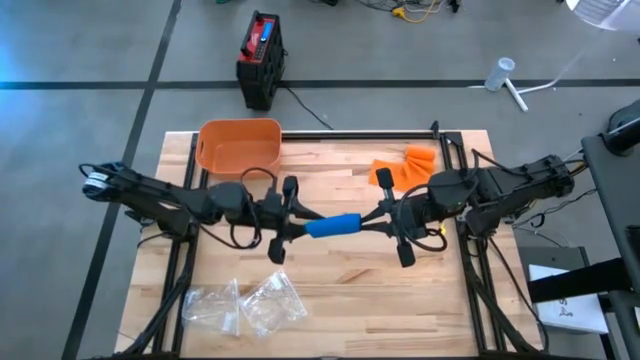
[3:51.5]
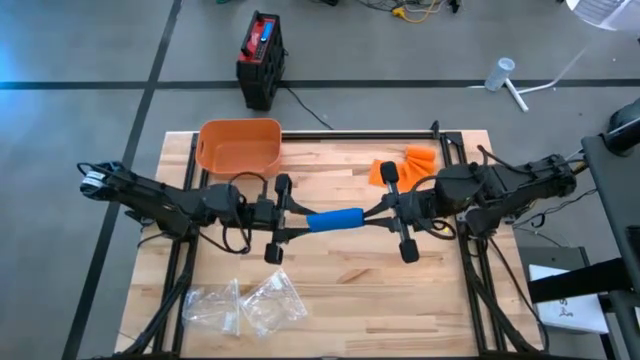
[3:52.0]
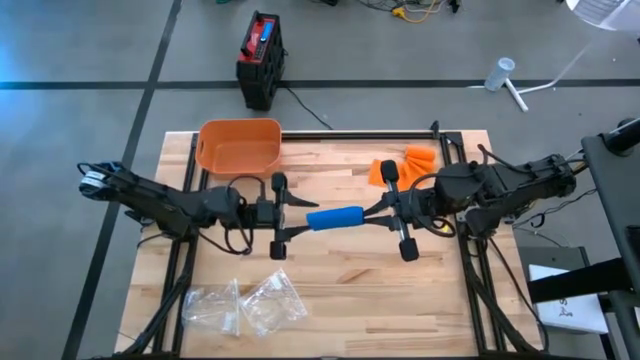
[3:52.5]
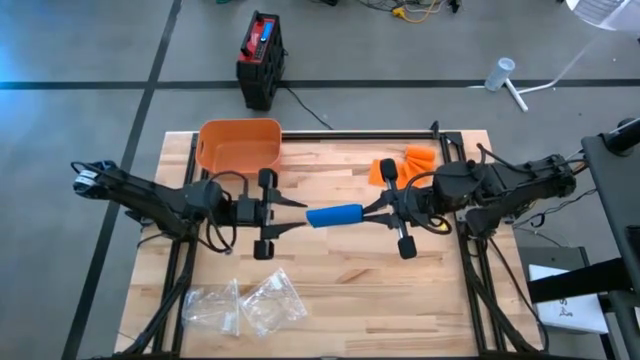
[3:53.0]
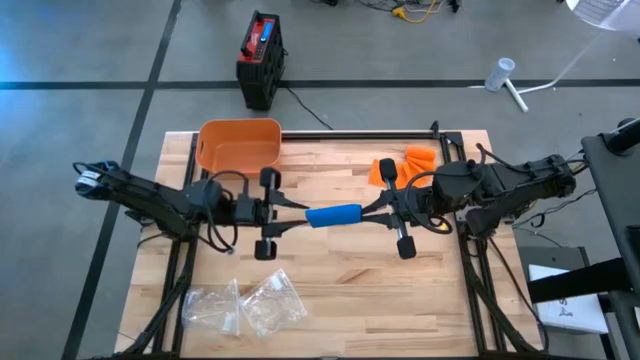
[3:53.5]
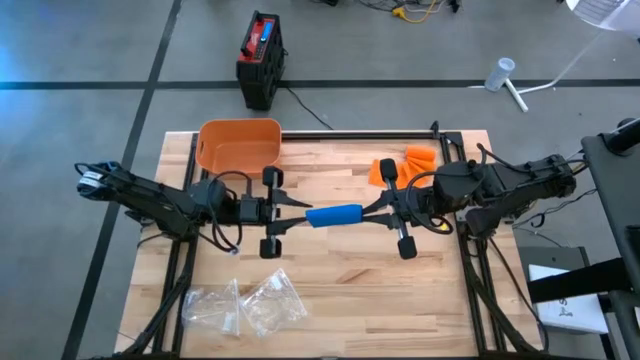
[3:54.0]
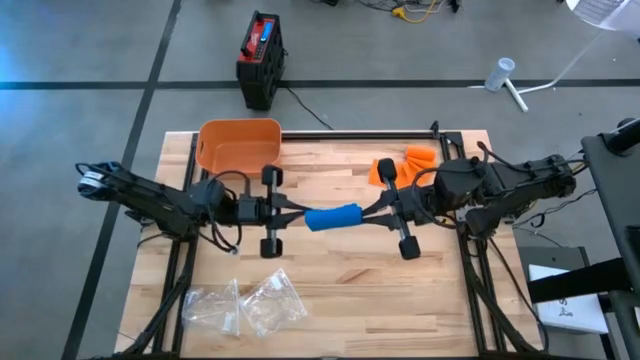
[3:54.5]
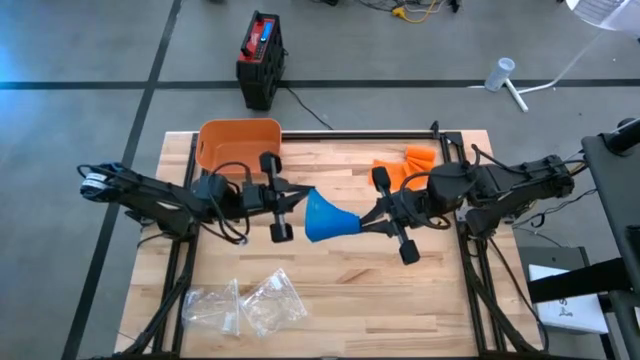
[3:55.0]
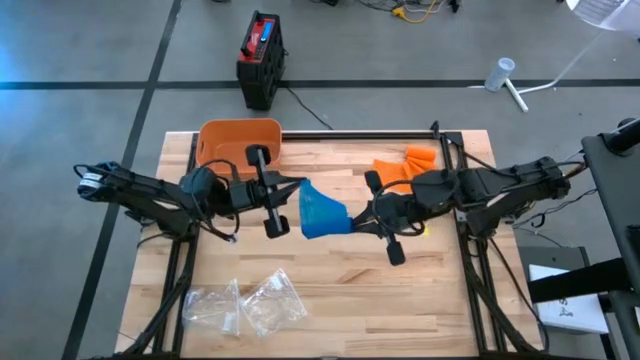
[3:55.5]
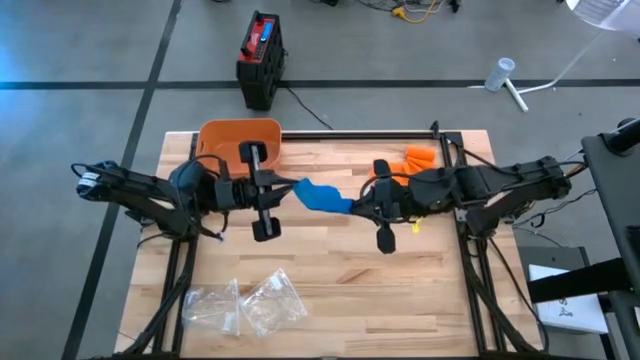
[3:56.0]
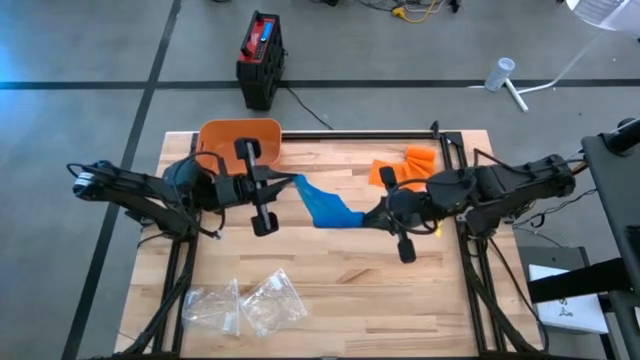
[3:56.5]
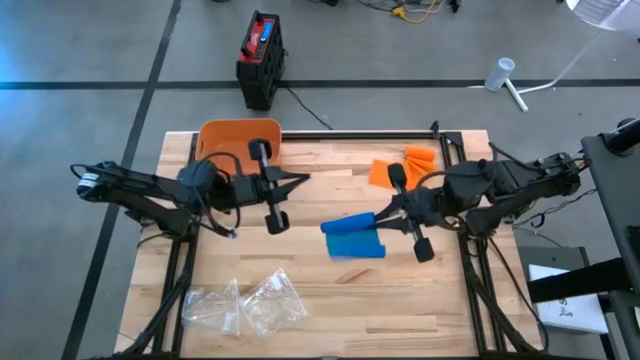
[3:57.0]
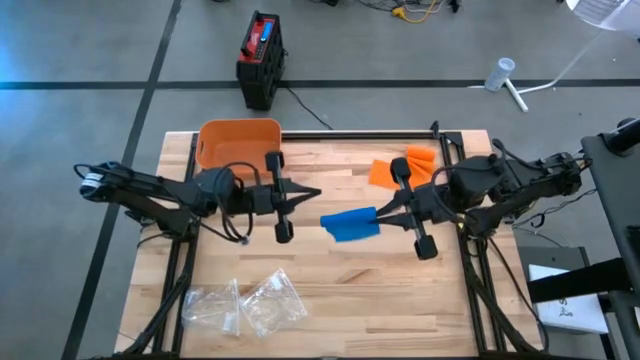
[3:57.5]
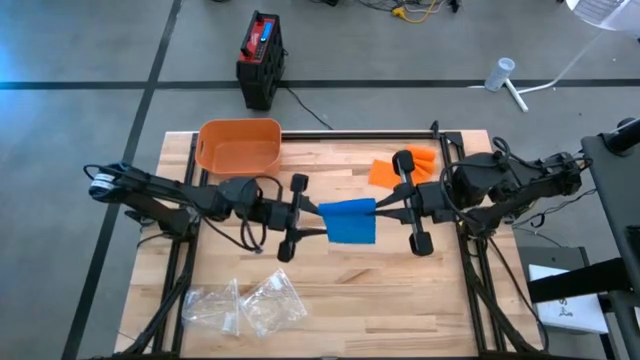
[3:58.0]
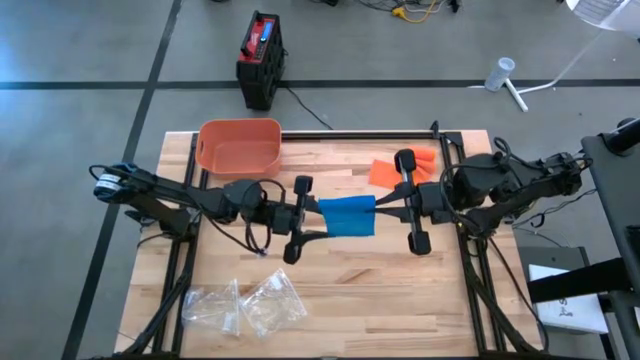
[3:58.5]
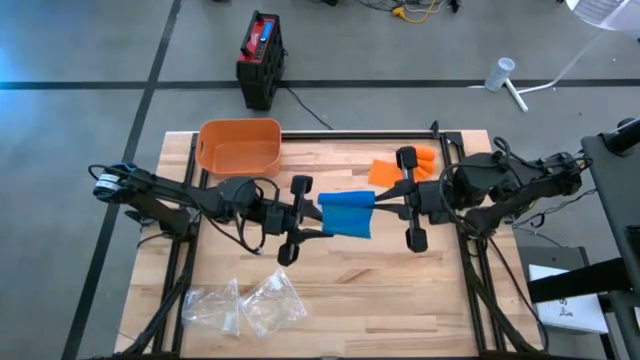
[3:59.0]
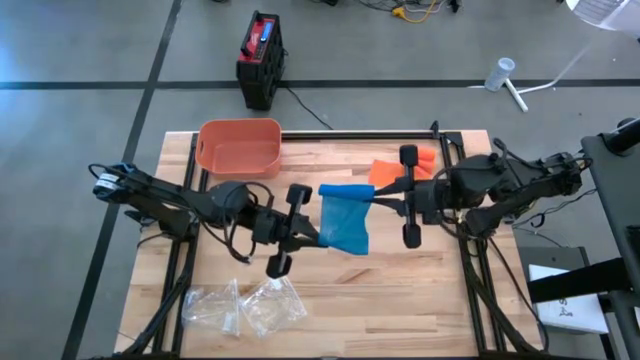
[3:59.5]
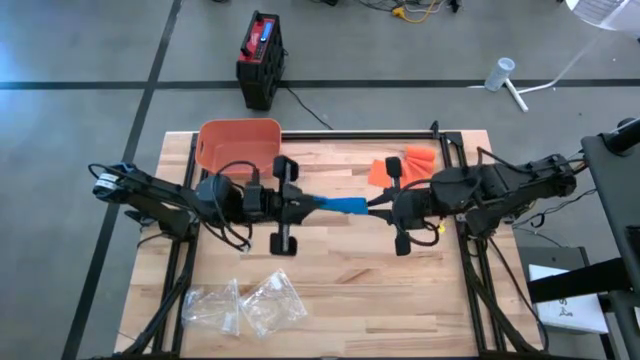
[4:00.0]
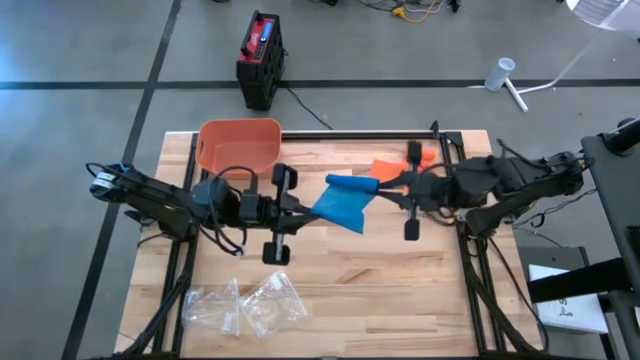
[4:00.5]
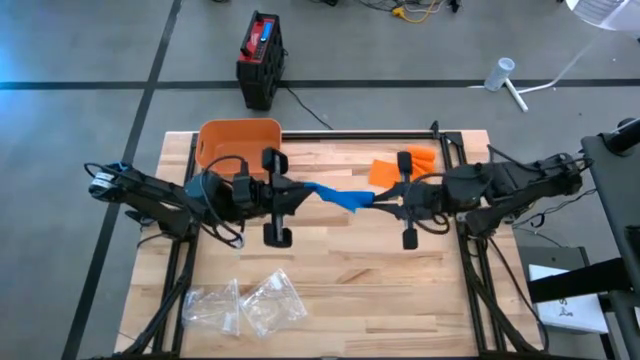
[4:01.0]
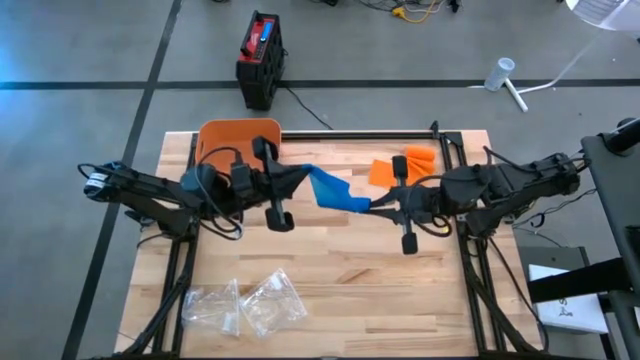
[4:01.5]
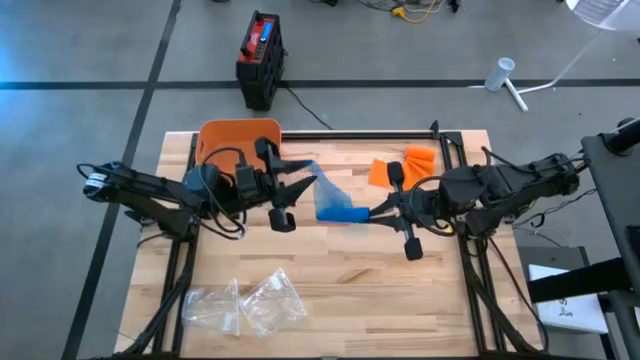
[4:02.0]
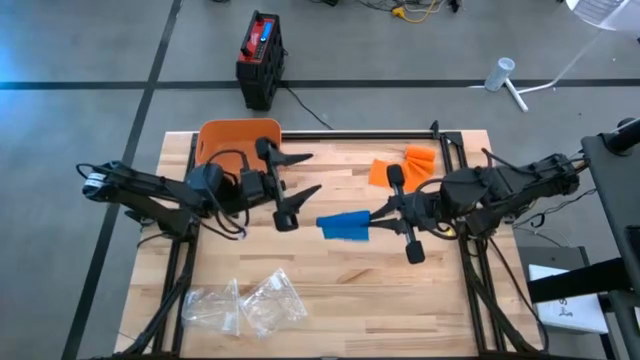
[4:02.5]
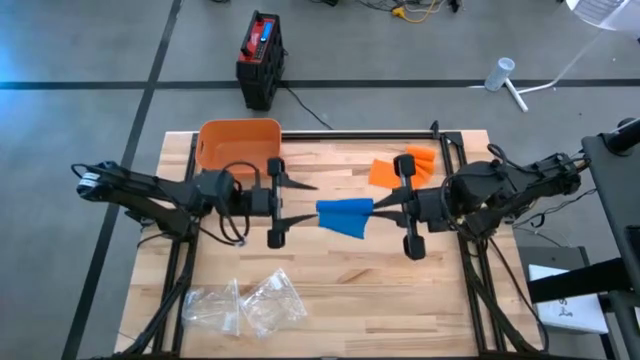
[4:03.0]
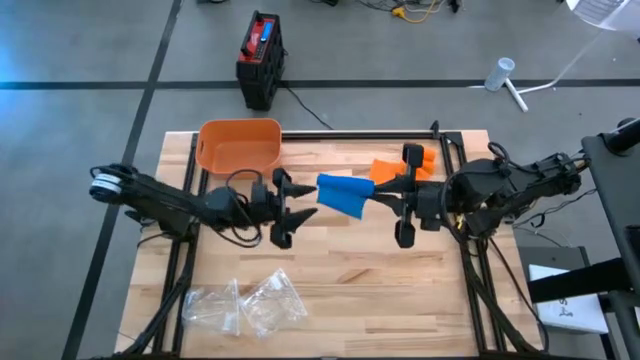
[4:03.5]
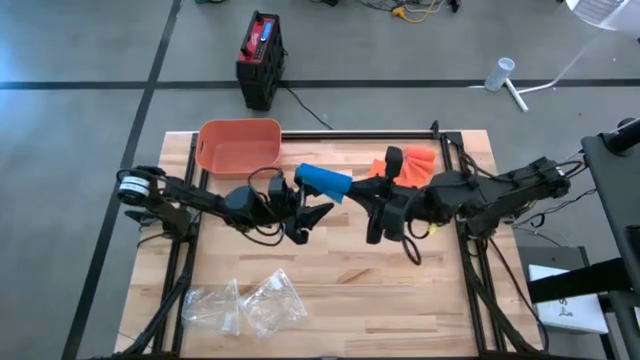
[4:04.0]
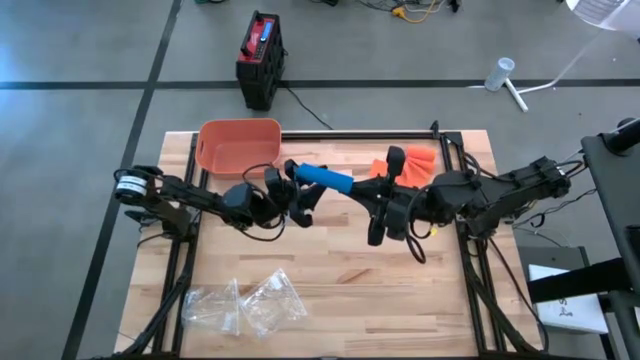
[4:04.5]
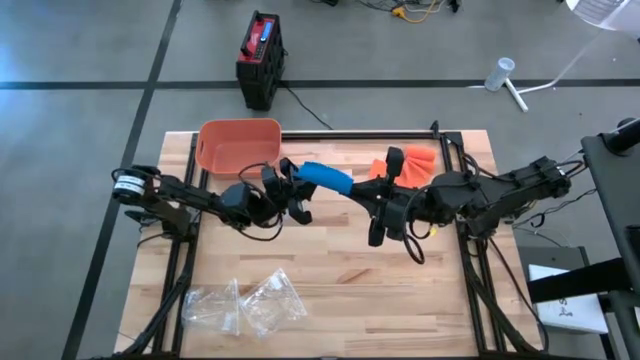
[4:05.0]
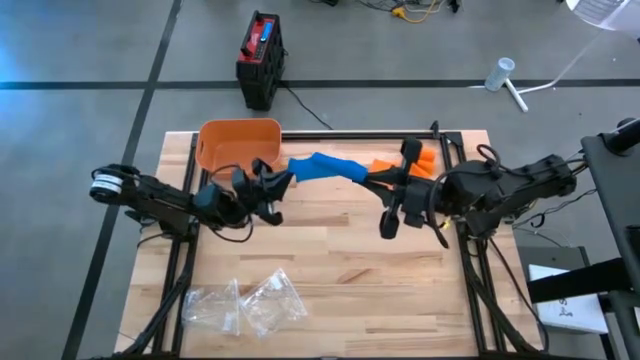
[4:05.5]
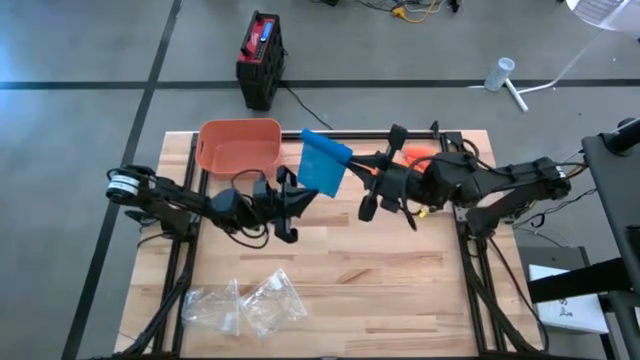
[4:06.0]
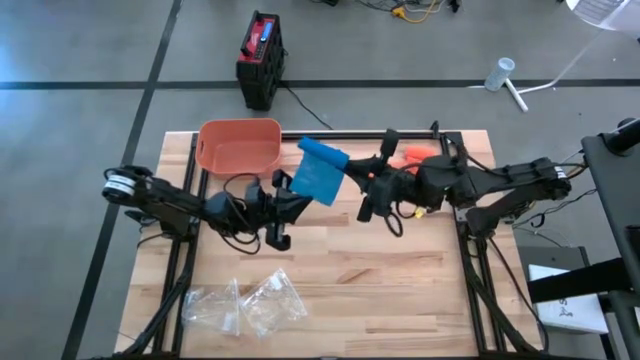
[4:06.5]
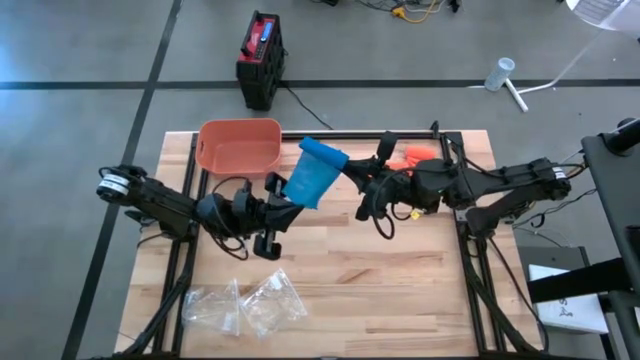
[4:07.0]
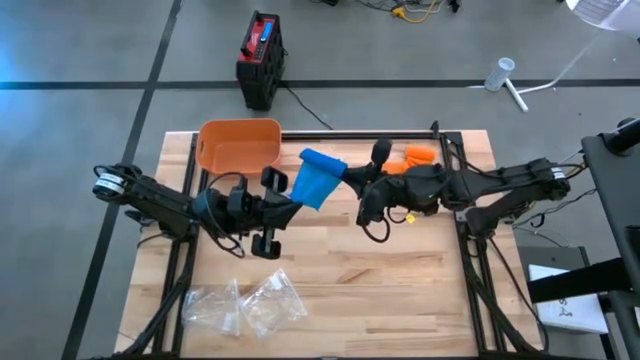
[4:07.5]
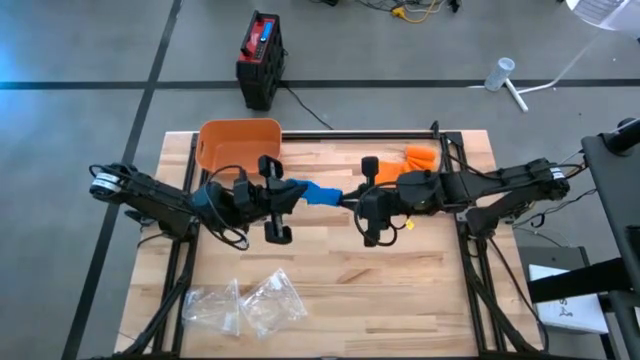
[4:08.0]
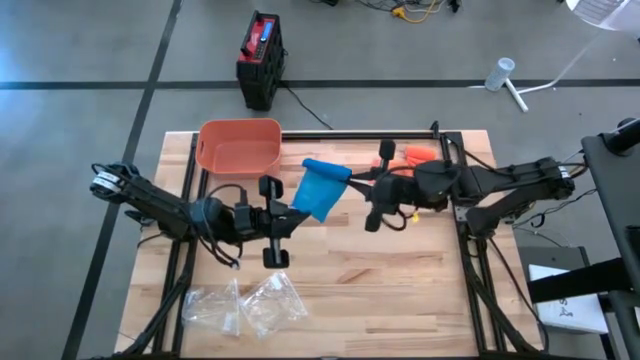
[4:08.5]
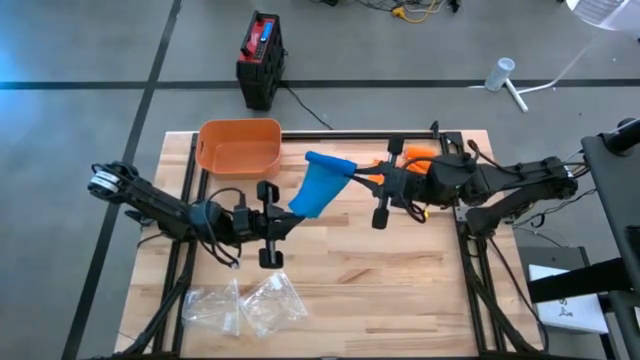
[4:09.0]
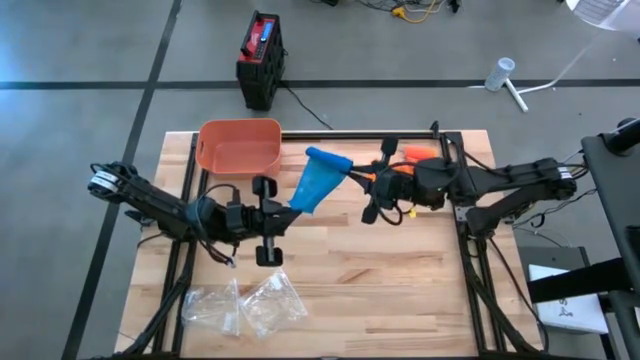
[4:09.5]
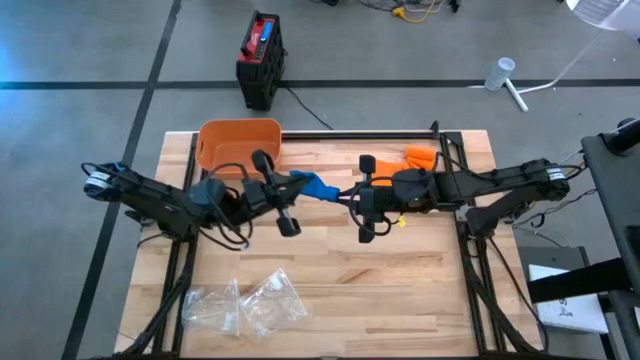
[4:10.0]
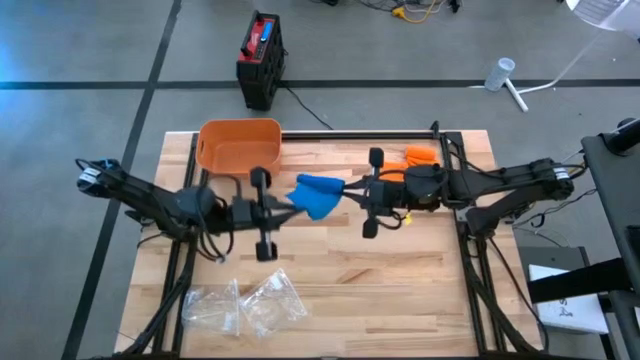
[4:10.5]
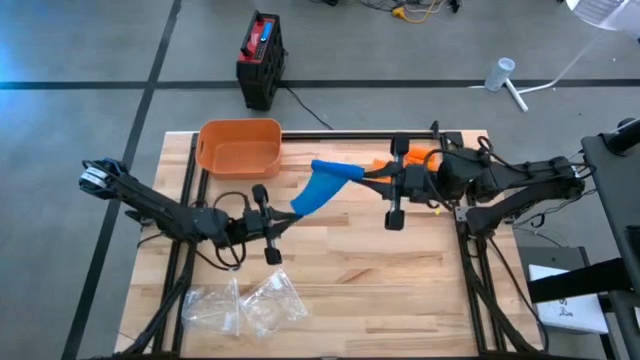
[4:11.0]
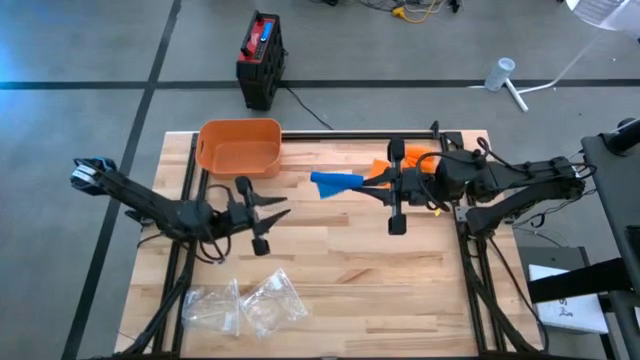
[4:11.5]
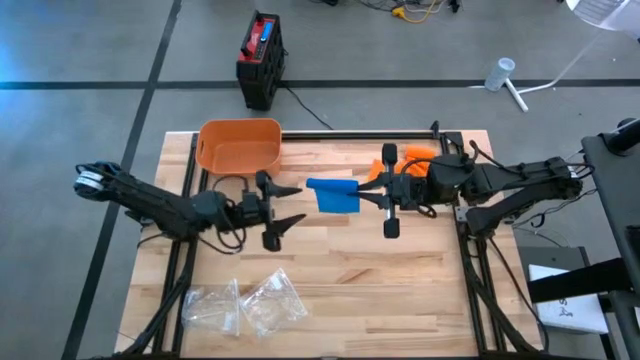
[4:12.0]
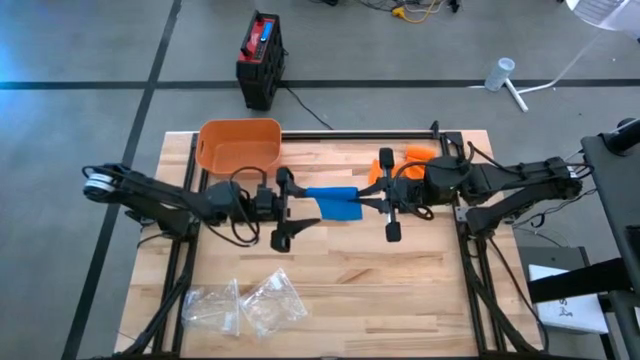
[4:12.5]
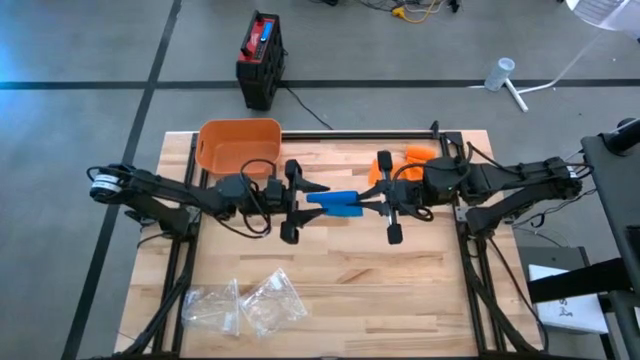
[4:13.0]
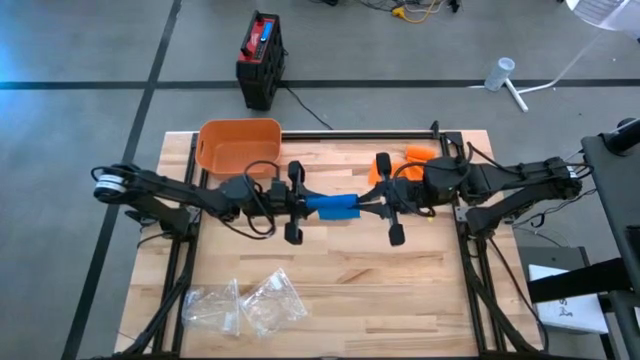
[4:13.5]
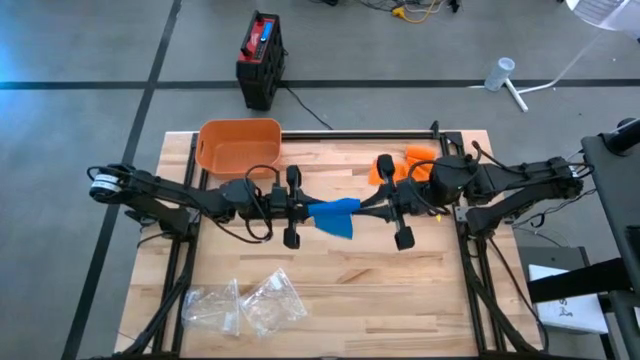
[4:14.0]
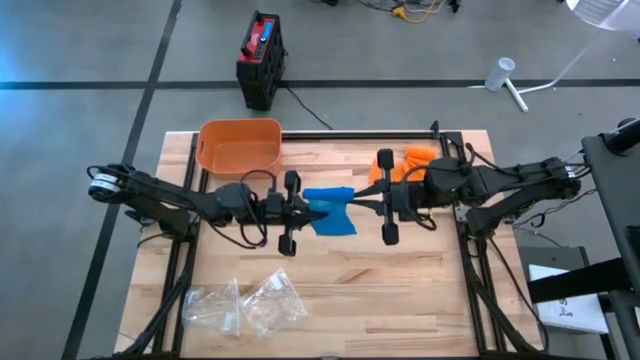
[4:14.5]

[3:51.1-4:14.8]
Task: Roll bandage
Roll the blue bandage
